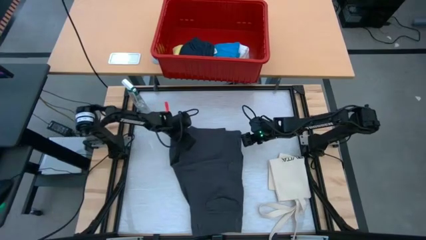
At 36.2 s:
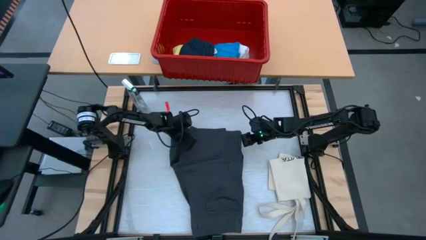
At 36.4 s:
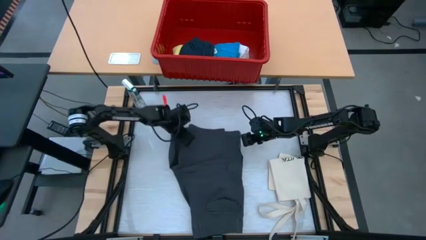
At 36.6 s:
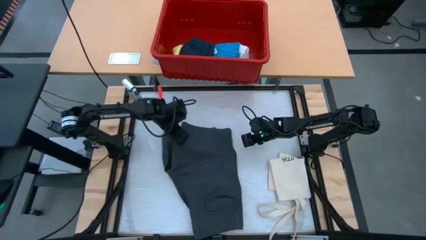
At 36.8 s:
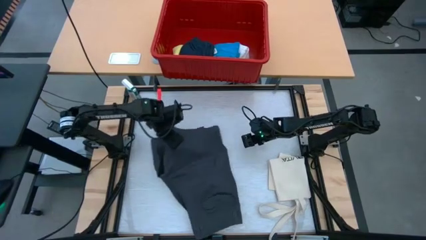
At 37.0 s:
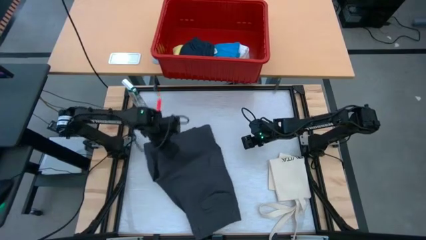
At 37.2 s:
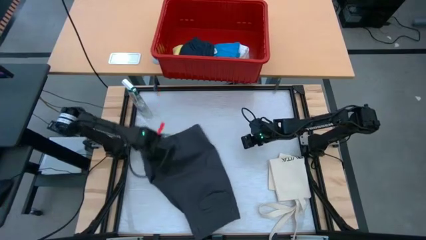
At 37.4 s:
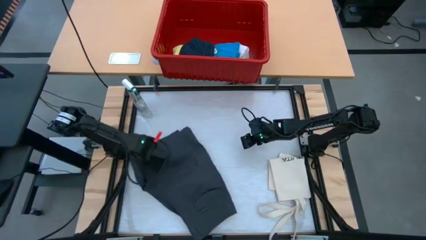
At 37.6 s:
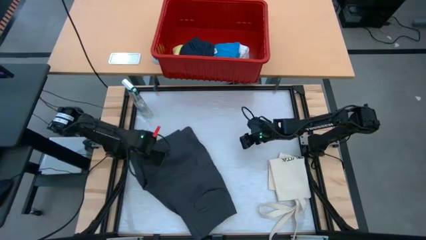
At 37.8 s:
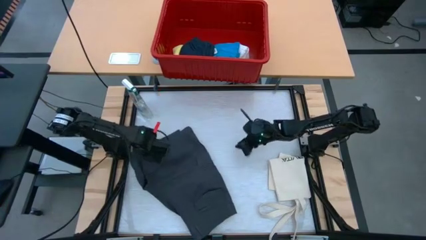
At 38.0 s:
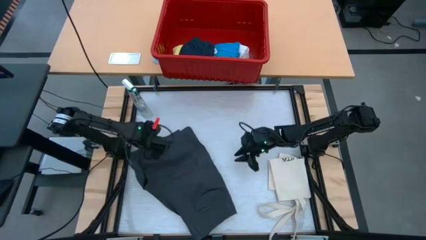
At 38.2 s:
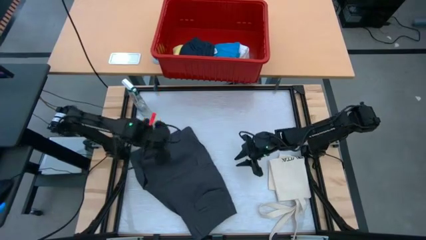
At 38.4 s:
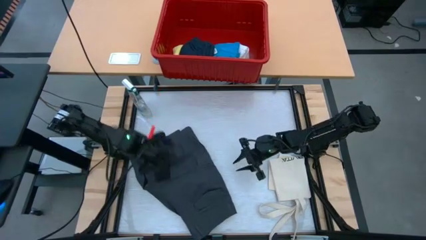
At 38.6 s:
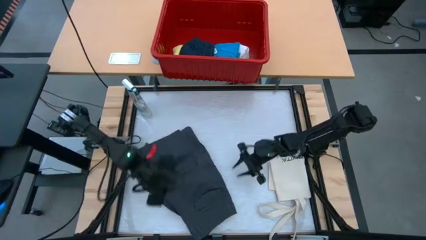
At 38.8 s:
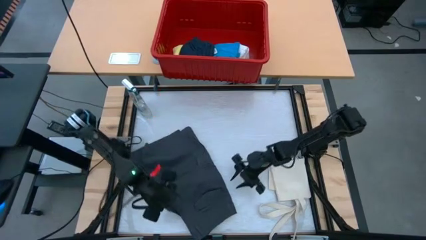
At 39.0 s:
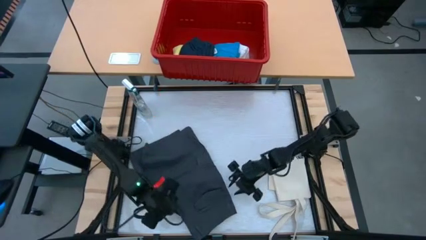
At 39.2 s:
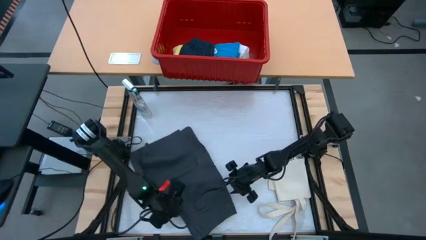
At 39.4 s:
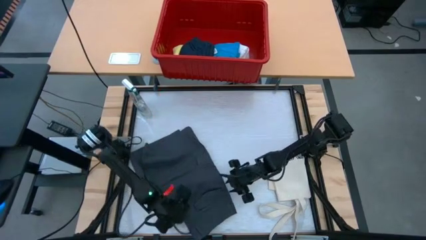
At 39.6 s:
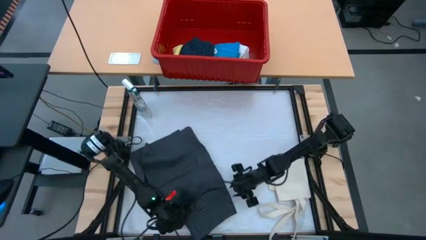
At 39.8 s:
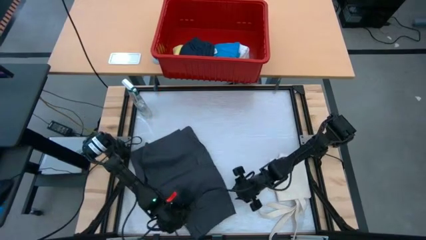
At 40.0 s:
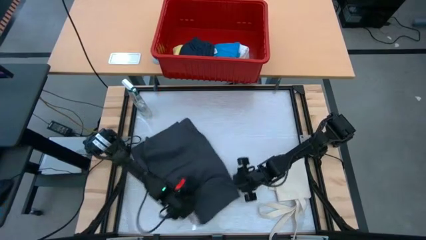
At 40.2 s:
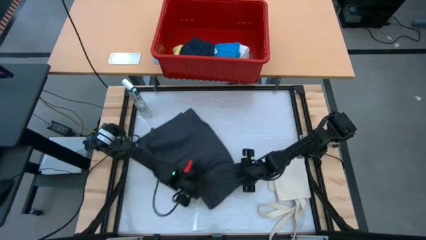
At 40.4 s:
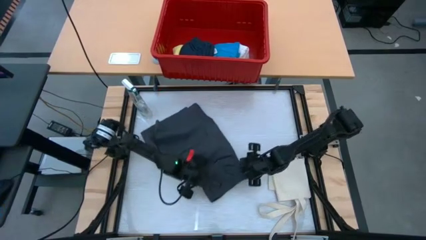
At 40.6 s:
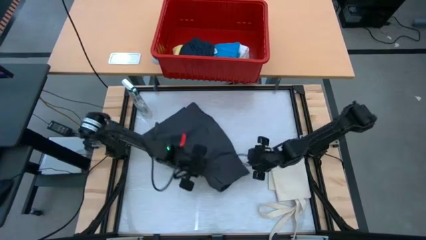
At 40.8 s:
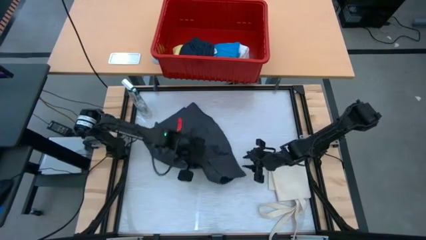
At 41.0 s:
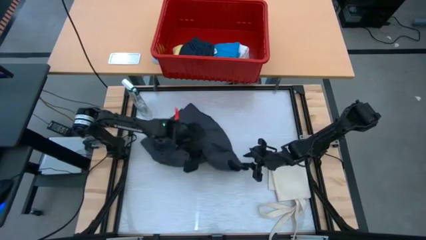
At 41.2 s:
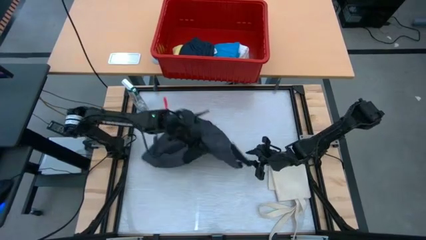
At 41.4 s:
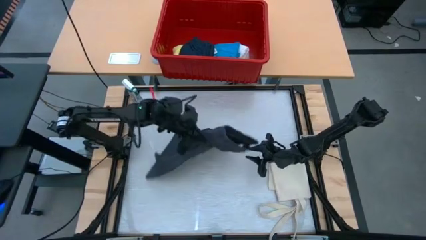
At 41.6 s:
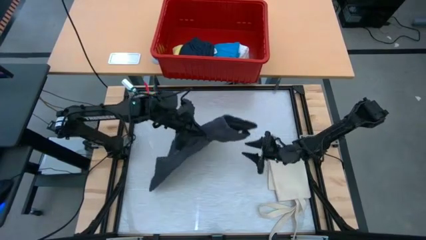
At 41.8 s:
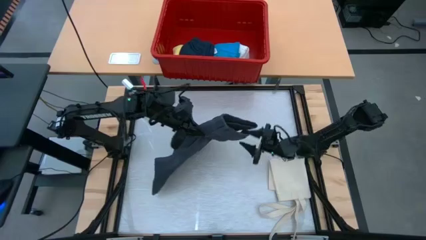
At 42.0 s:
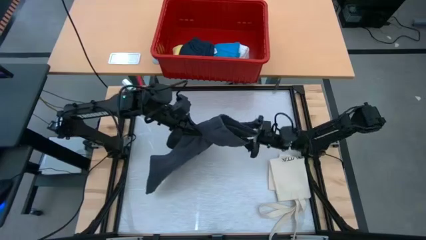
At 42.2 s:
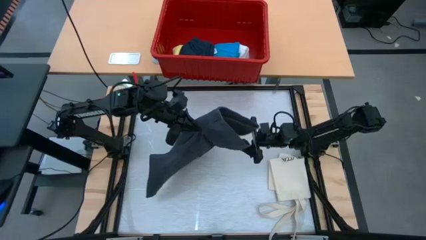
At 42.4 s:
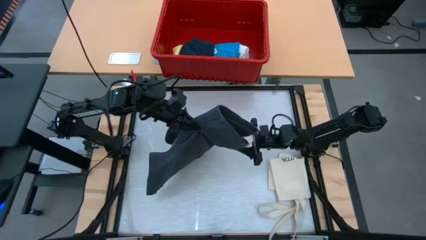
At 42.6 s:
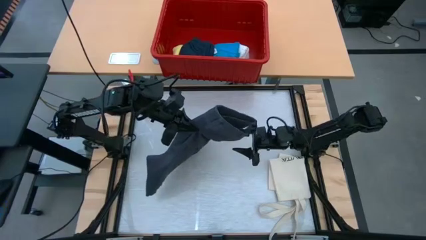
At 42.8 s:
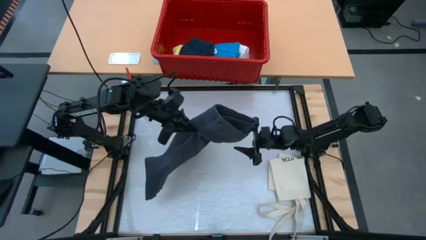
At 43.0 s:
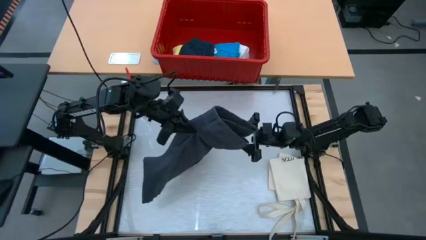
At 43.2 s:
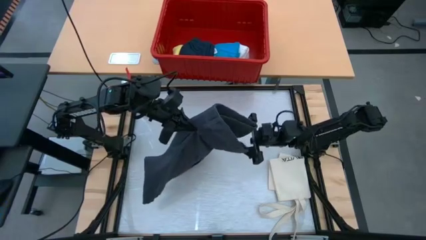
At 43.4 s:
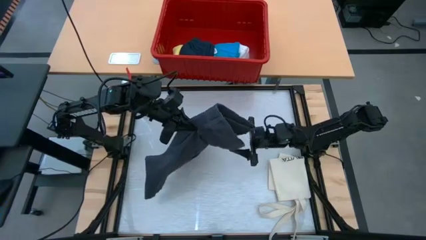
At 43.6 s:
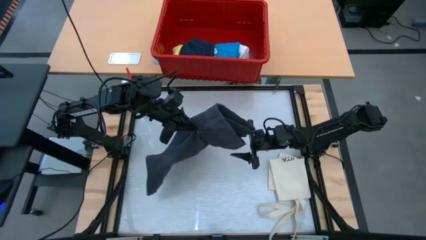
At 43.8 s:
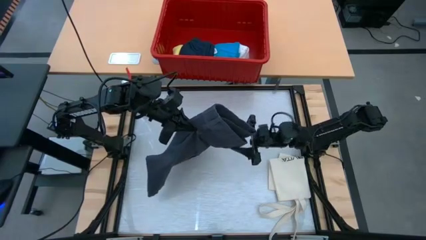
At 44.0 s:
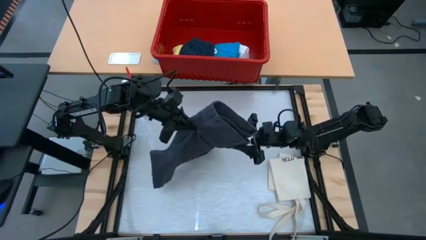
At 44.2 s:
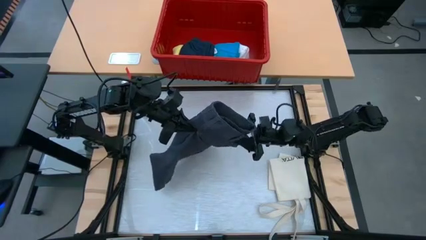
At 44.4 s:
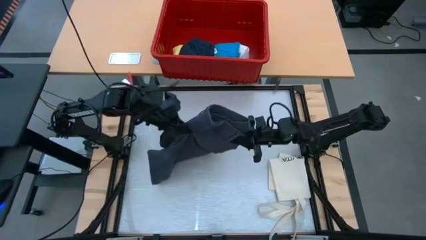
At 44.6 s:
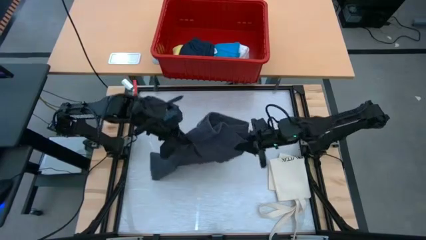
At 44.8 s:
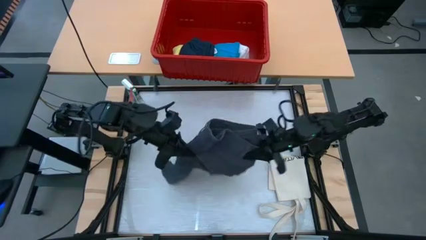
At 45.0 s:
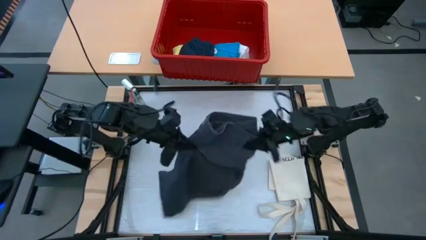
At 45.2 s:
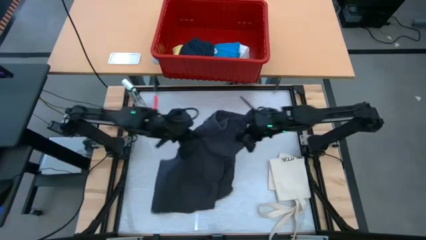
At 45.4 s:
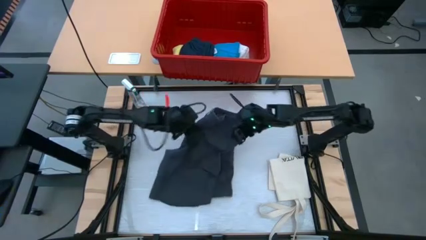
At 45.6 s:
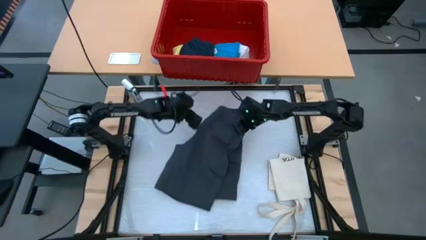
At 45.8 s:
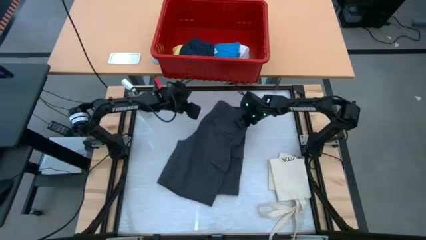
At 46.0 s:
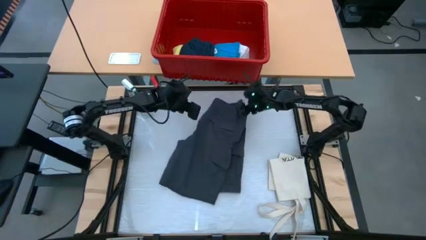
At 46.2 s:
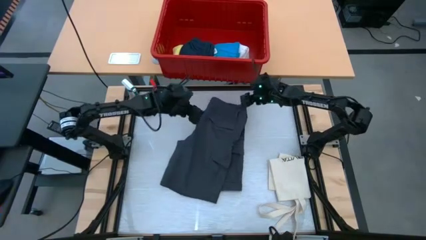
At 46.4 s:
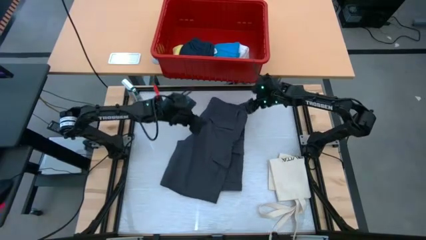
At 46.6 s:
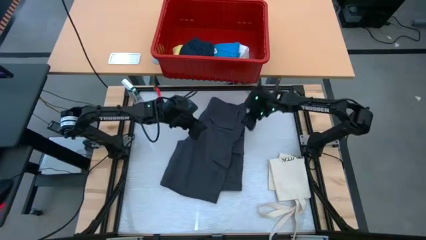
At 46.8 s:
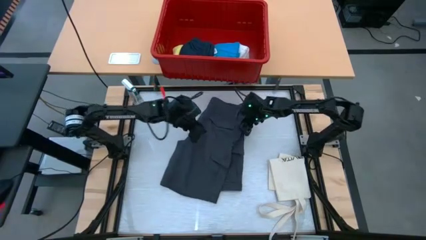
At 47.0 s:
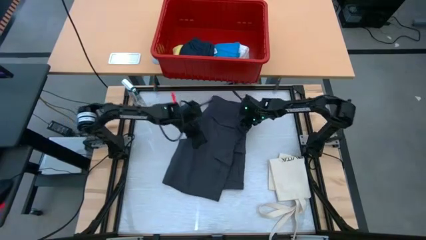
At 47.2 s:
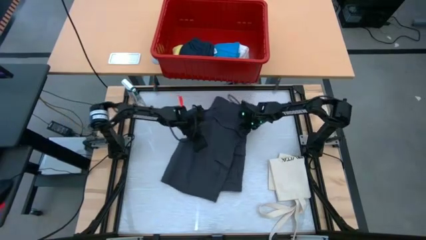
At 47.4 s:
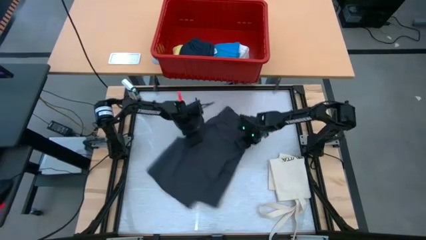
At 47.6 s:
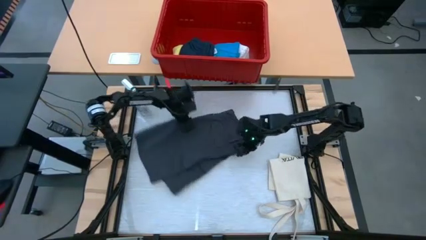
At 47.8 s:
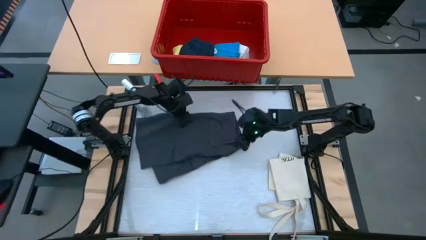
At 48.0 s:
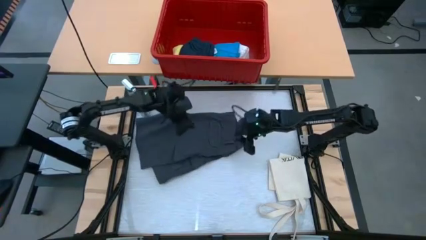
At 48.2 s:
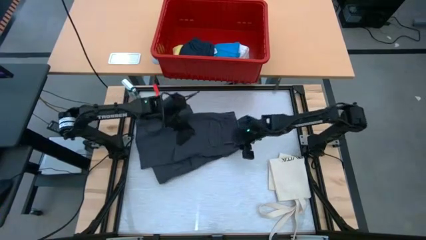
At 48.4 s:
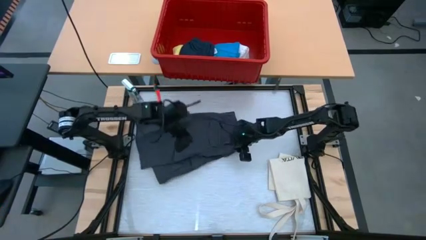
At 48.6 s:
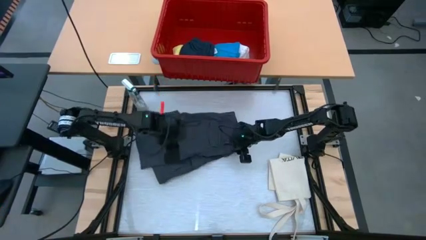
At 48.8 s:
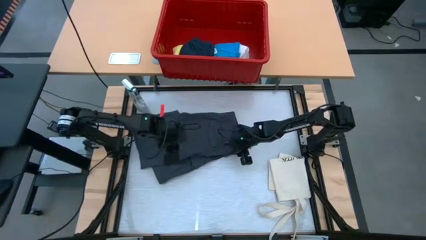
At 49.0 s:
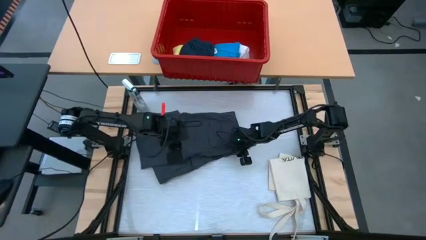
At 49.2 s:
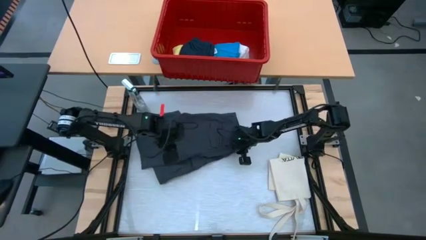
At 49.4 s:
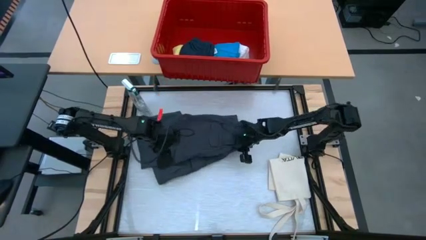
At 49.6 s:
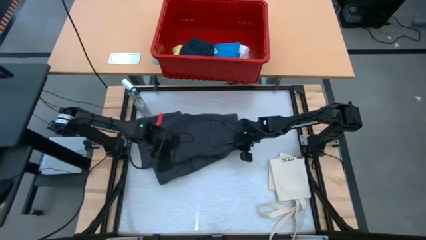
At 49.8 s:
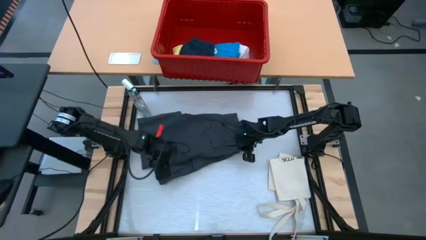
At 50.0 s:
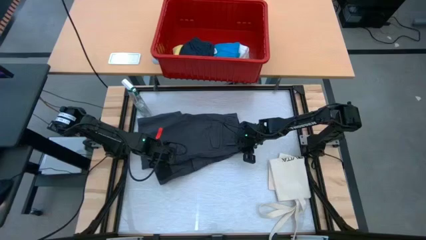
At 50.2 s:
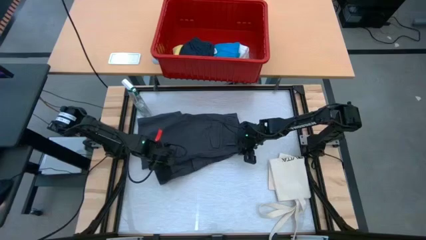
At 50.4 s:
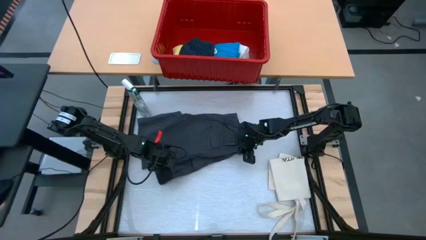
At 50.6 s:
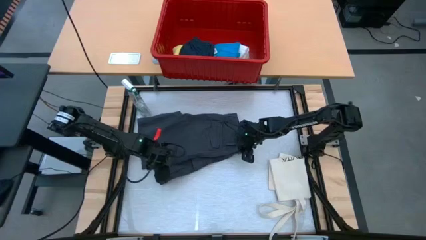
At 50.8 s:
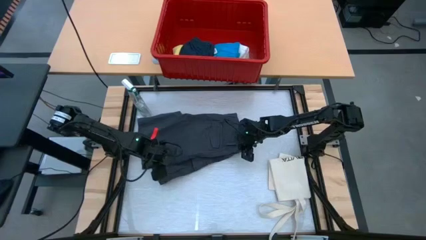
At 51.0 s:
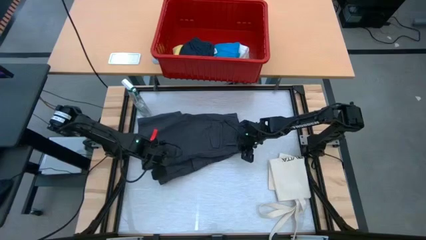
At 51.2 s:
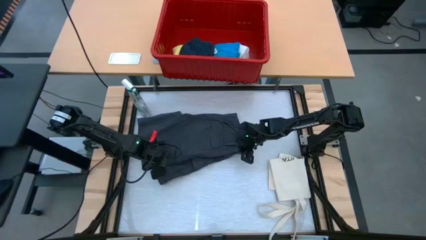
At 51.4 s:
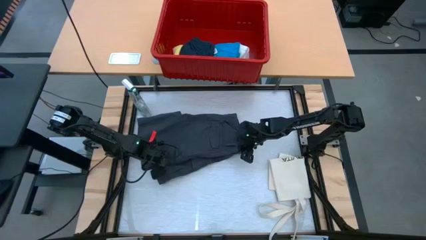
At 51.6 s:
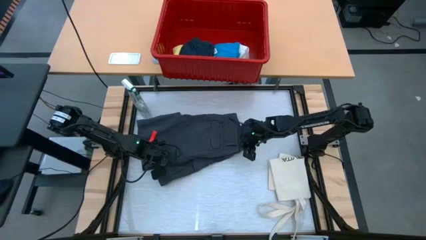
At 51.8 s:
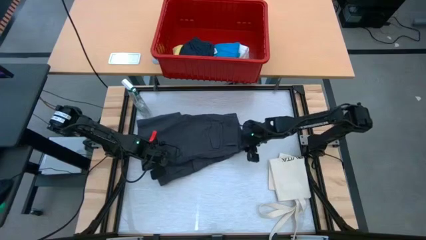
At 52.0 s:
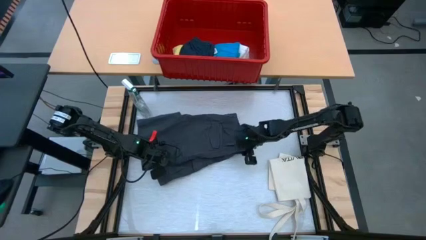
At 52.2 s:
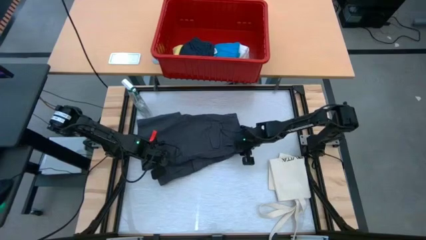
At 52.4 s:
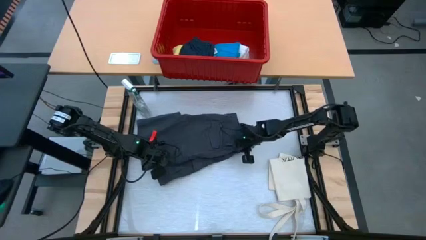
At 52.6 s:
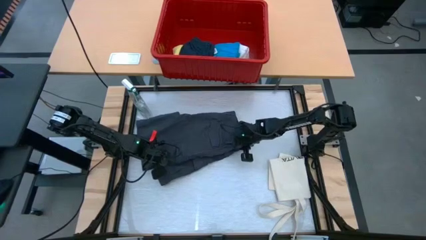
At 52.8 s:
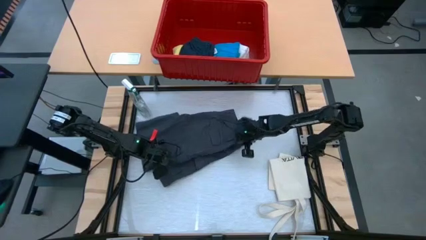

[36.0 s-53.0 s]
Task: Fold laundry
Fold the dark blue shorts
